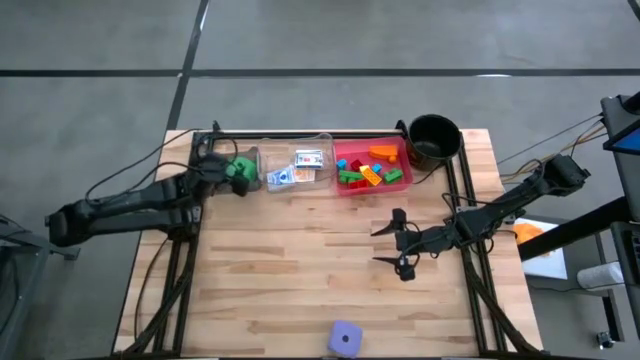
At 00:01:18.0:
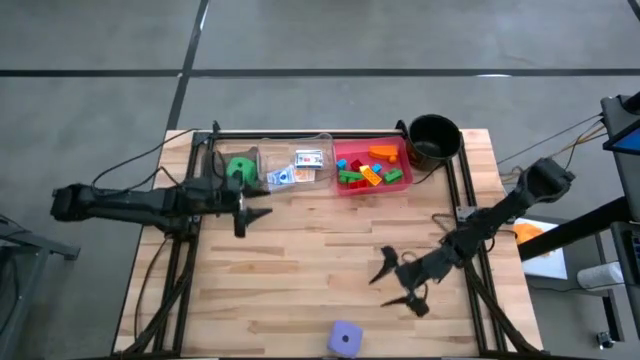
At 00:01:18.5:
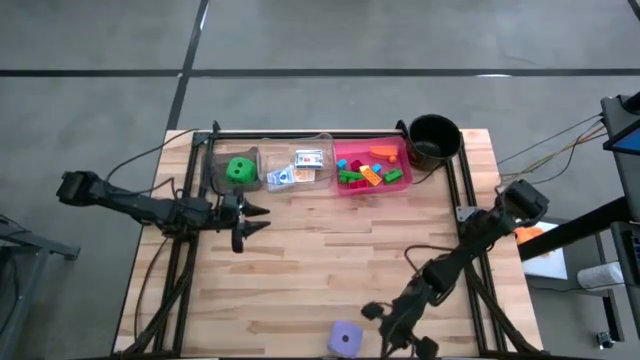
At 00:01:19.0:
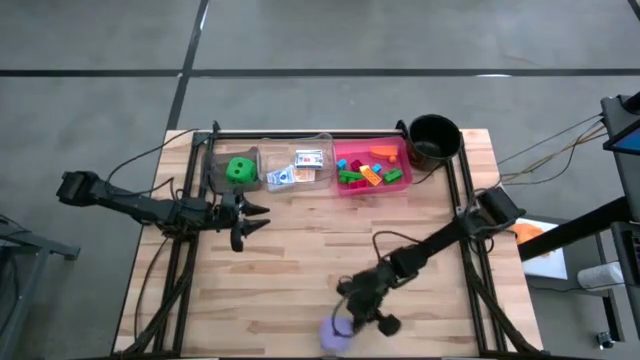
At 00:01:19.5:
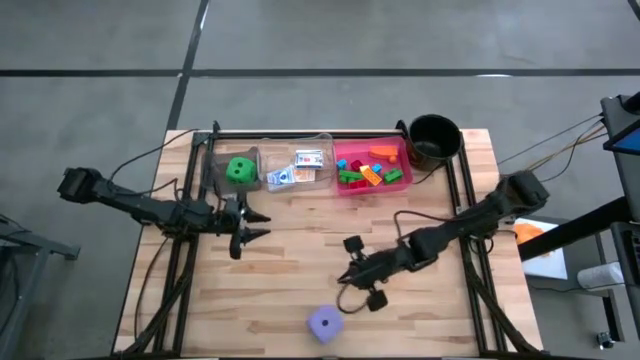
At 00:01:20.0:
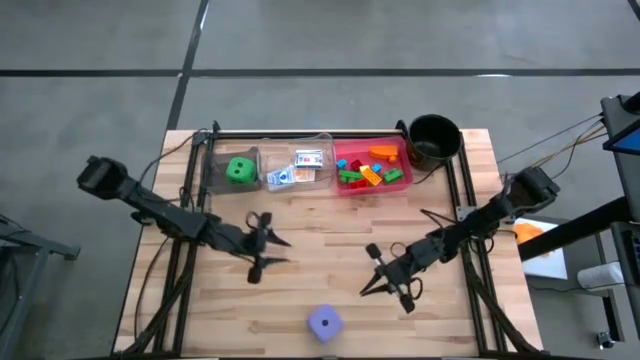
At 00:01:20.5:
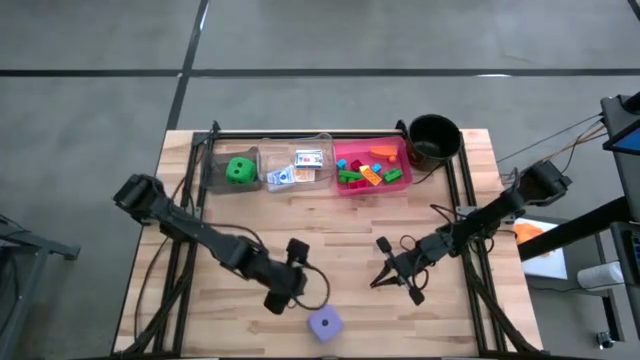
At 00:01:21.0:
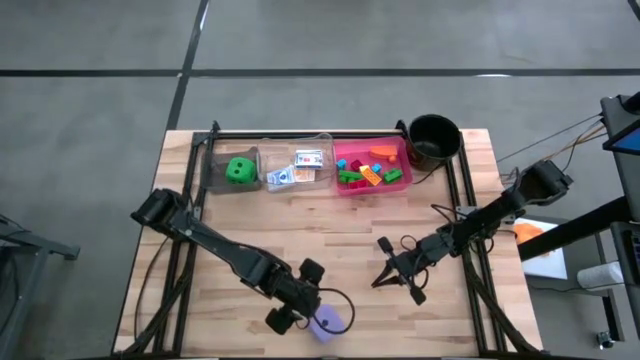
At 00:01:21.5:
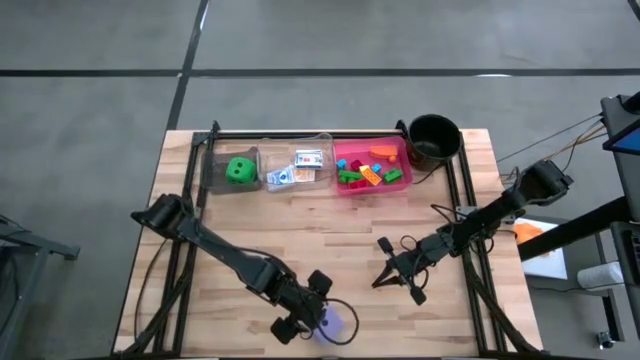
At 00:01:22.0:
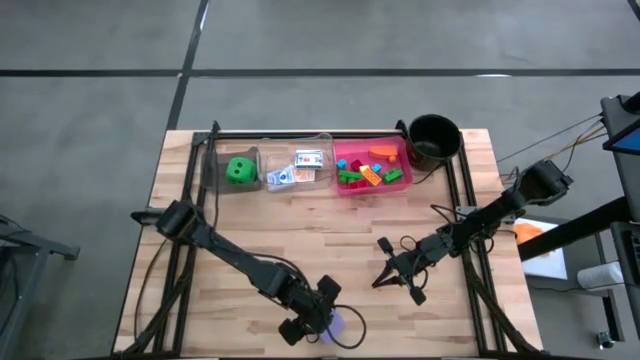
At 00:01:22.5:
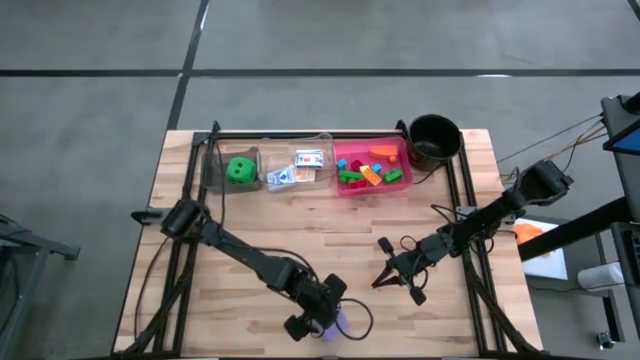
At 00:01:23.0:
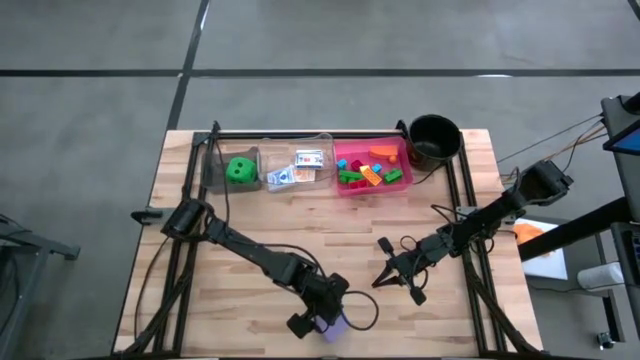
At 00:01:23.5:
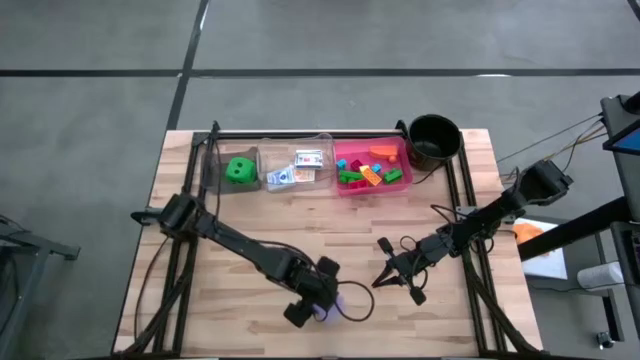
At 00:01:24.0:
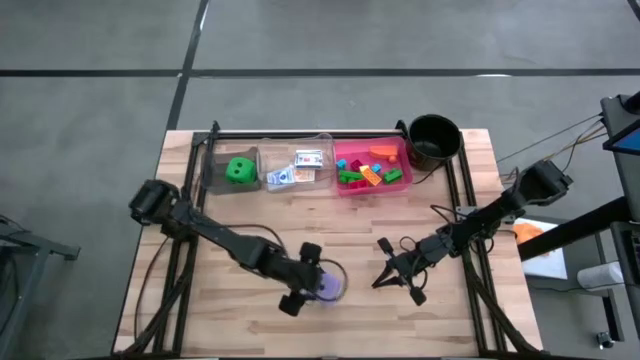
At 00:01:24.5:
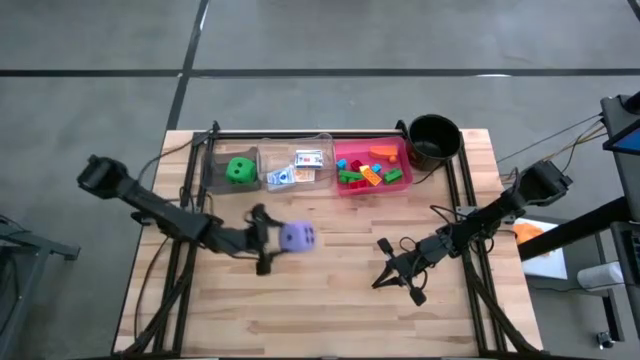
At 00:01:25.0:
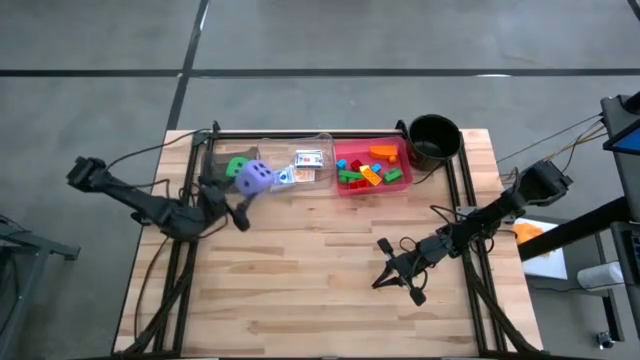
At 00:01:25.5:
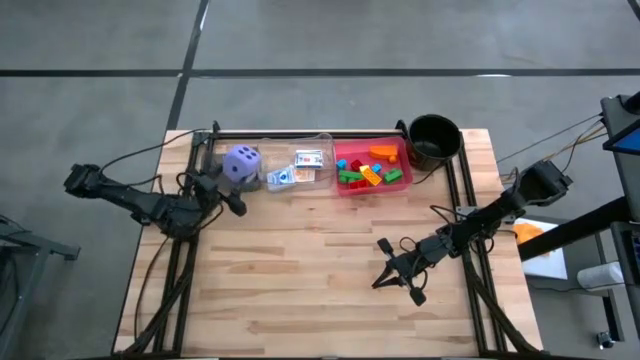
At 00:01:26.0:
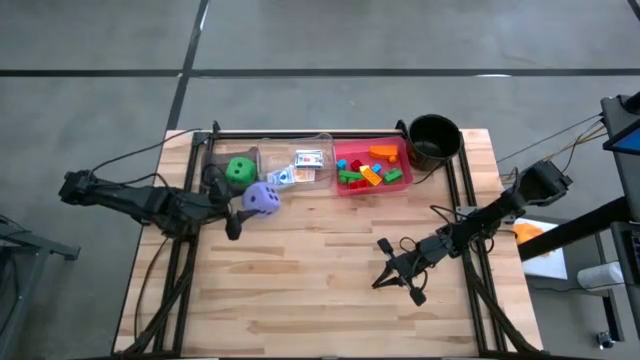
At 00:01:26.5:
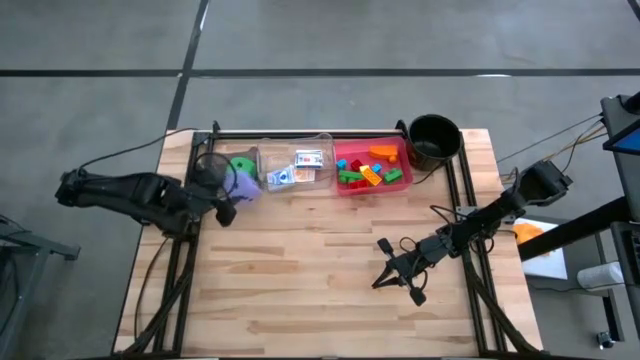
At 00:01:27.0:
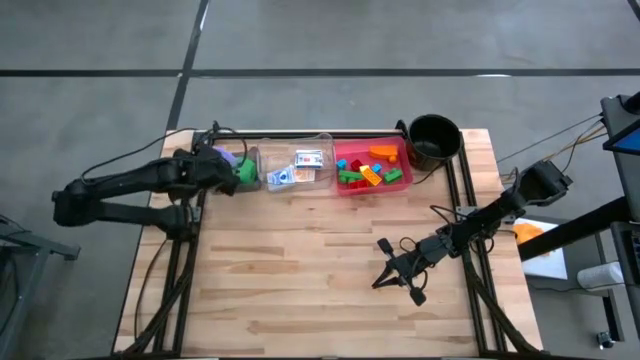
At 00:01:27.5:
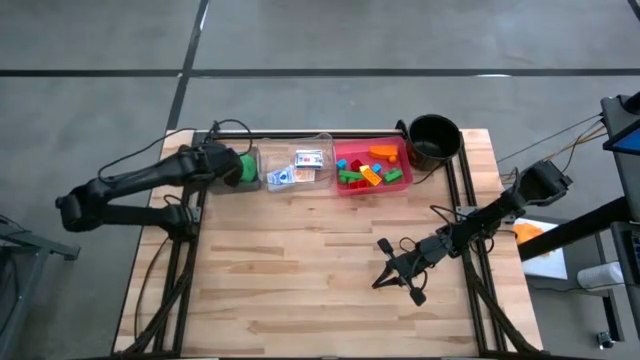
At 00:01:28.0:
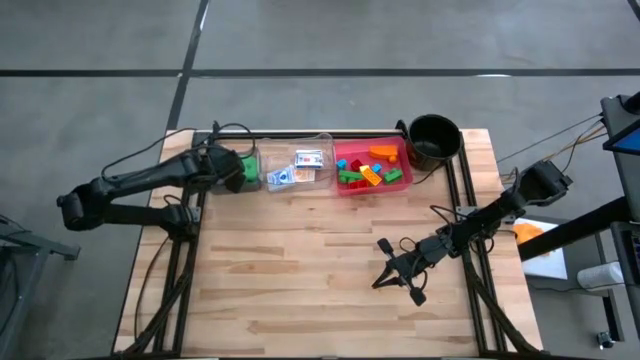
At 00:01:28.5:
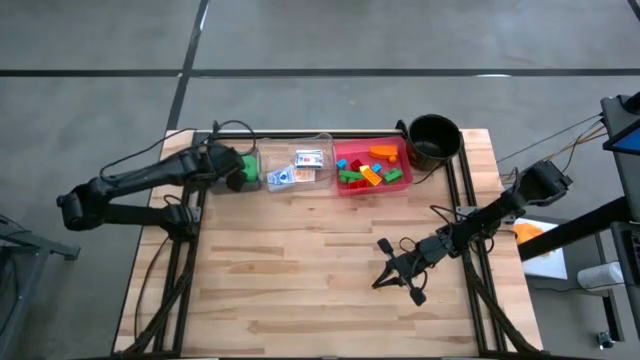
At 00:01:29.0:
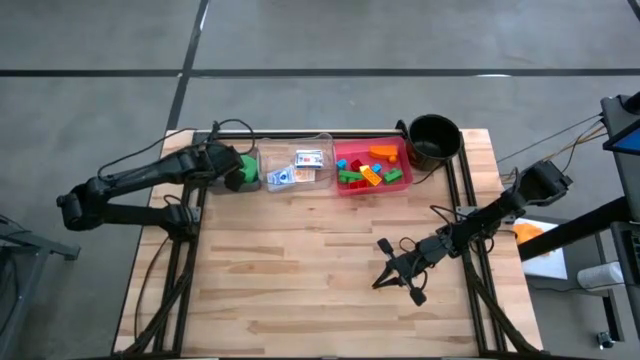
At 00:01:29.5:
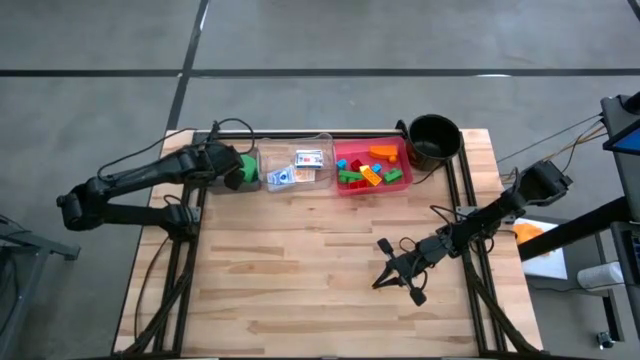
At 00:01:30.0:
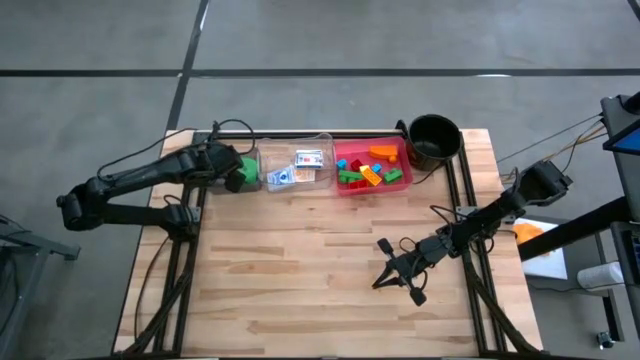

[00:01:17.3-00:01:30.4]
Task: Pick & Place Toys
Put the purple game die into the black bin

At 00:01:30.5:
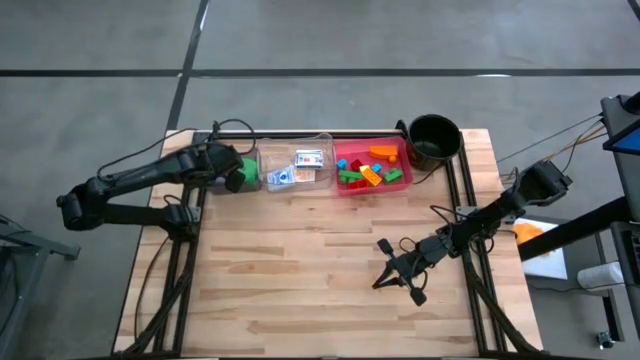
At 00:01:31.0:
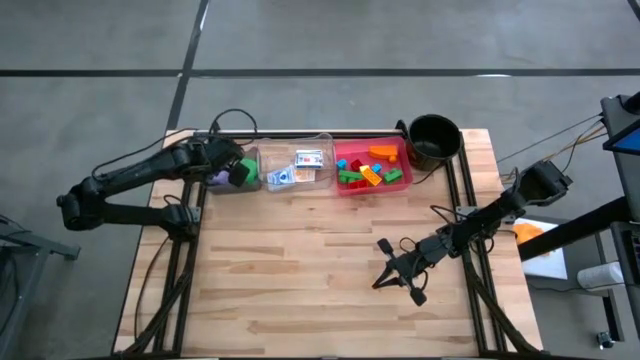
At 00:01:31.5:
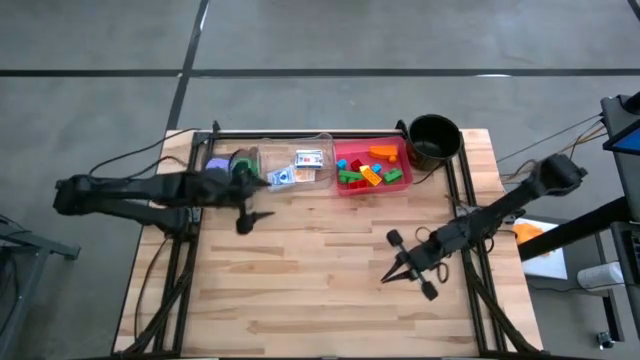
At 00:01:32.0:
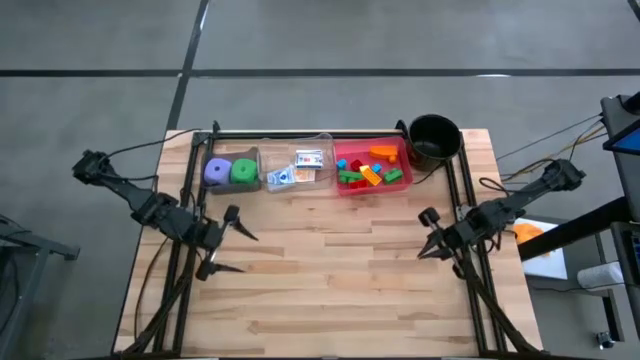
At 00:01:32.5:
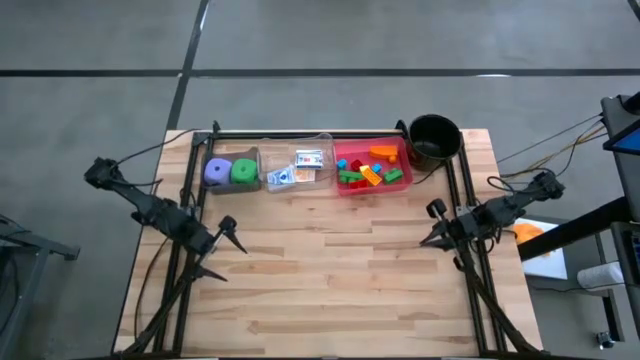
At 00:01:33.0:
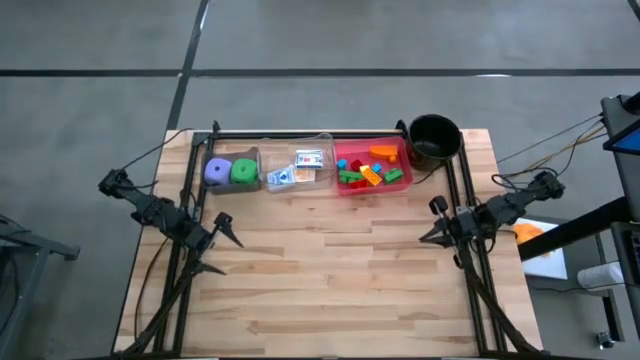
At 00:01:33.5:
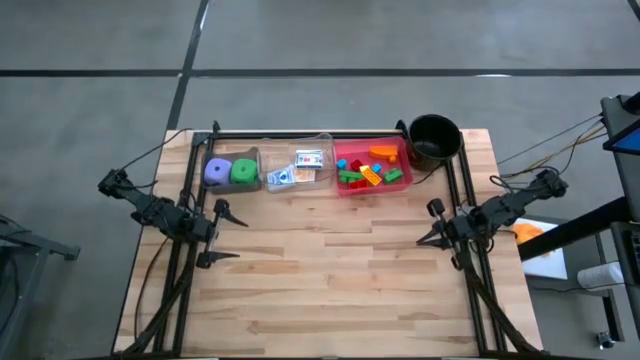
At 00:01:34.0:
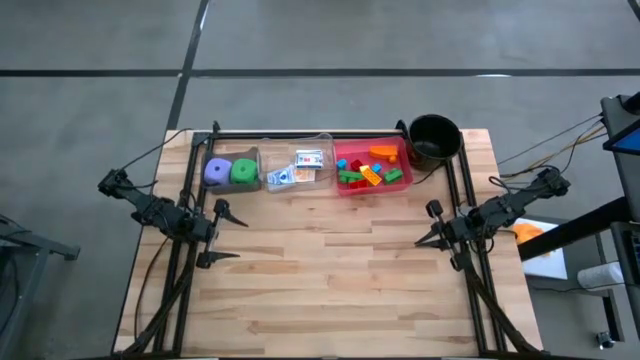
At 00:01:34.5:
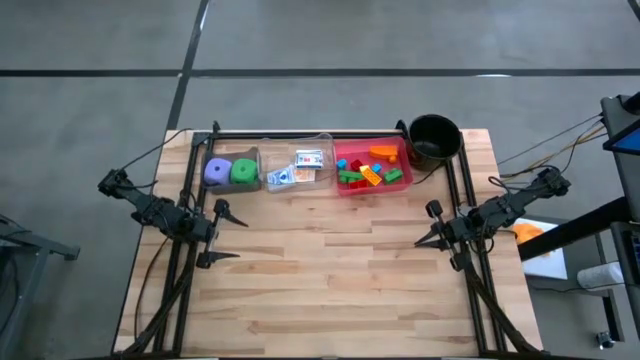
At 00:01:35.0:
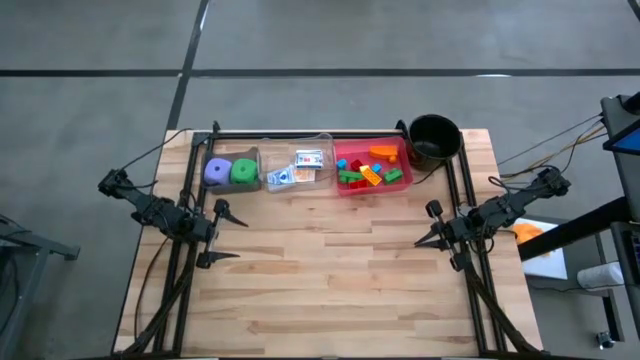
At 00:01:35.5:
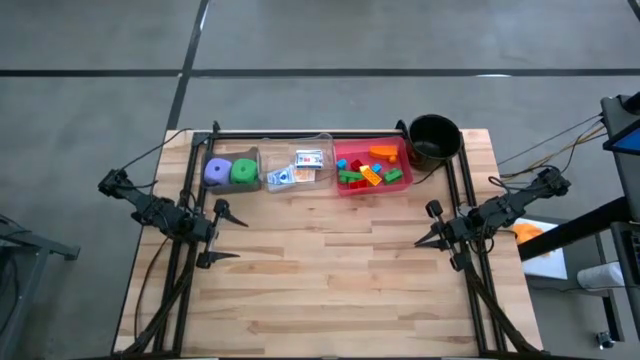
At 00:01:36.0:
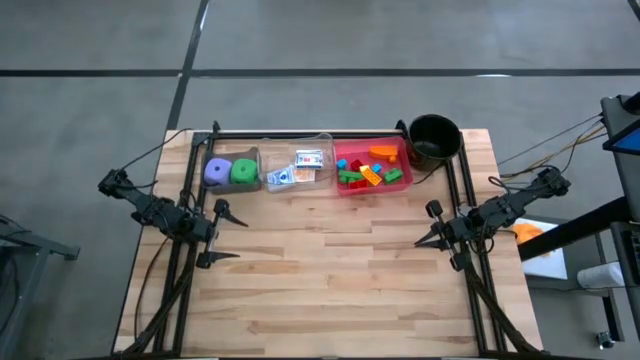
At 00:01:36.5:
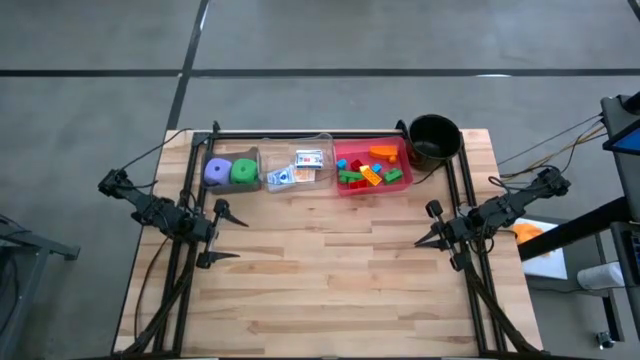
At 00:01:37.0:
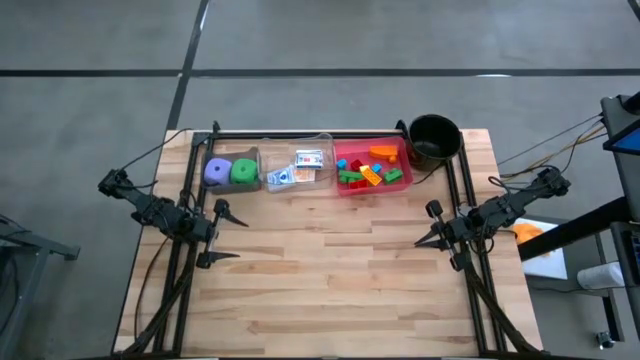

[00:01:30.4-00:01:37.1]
Return to Home Position

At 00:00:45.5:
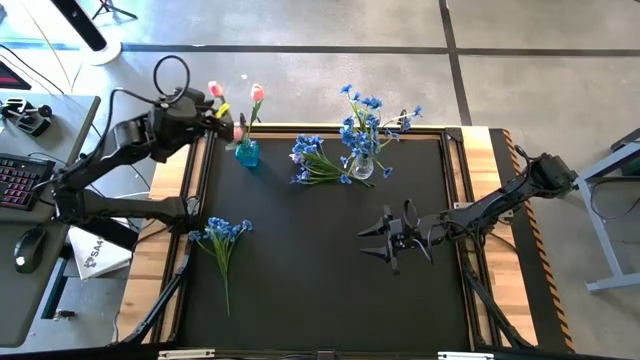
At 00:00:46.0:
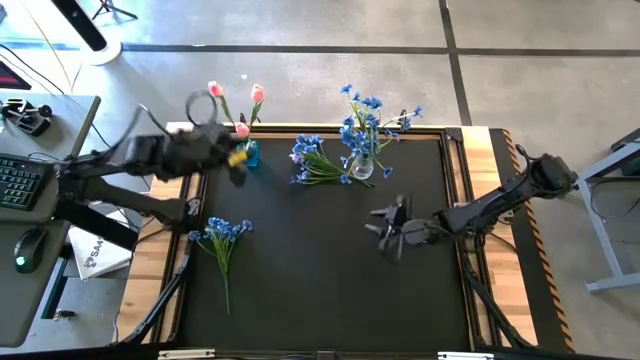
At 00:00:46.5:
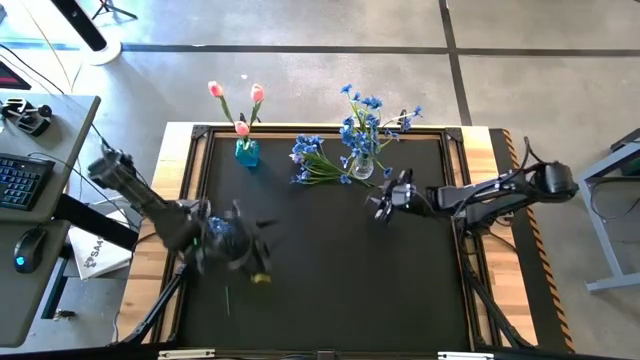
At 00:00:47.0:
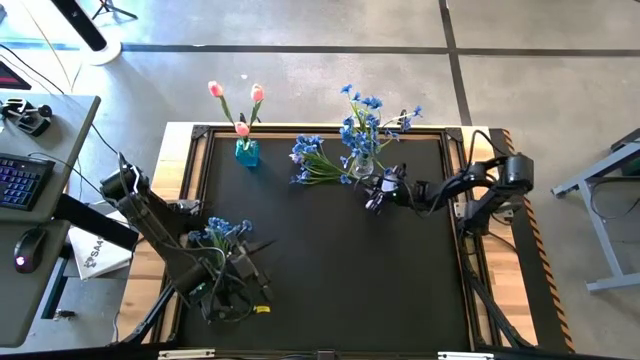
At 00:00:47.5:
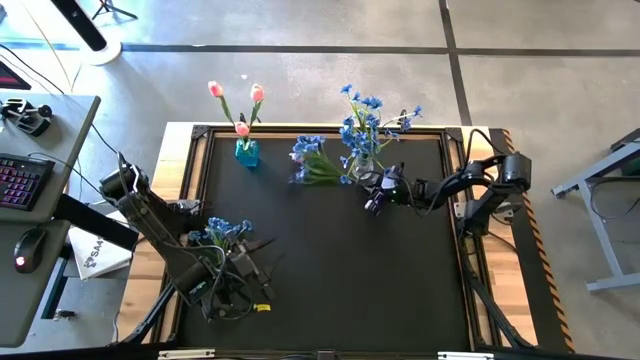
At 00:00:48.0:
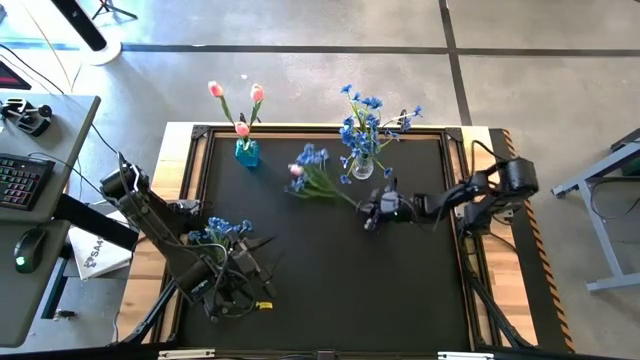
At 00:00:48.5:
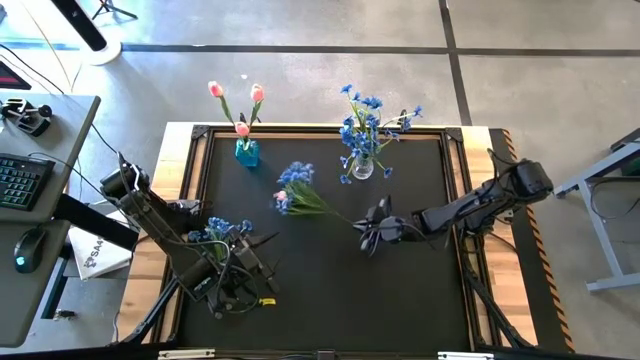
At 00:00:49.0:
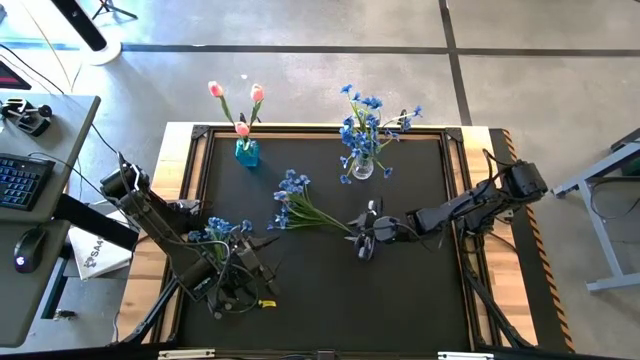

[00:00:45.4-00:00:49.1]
Task: Sort flowers into vase by color
Put the blue flowers into the transparent flower vase
